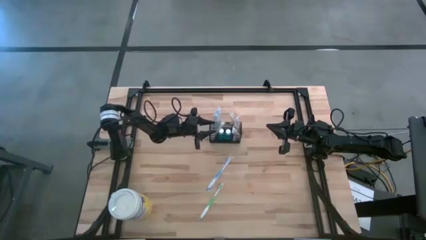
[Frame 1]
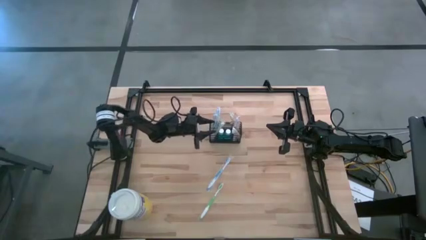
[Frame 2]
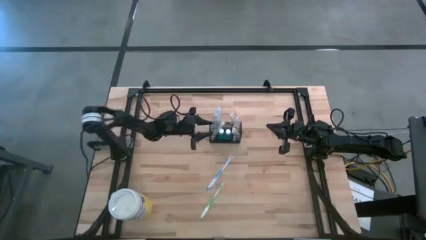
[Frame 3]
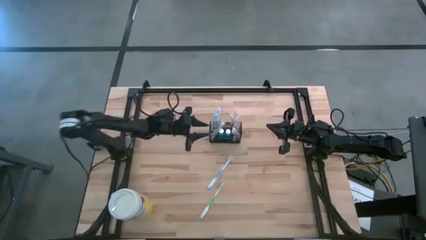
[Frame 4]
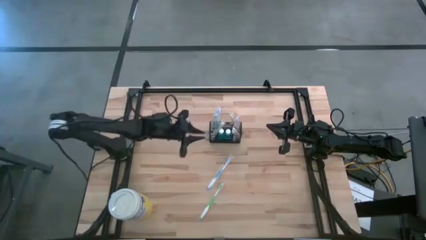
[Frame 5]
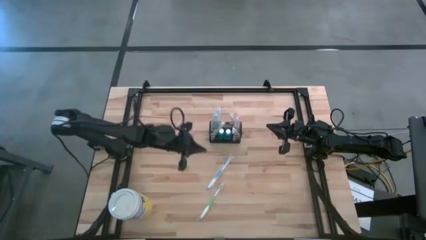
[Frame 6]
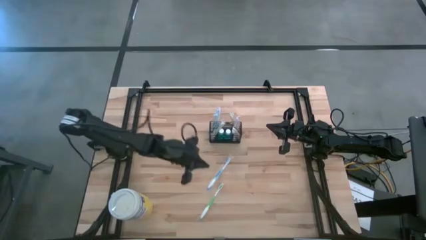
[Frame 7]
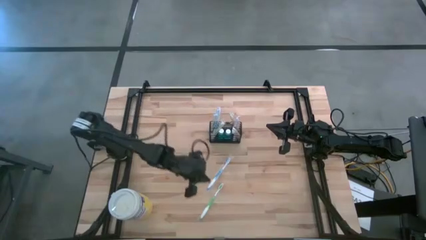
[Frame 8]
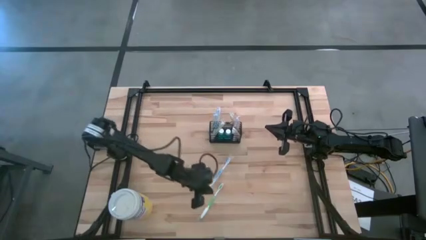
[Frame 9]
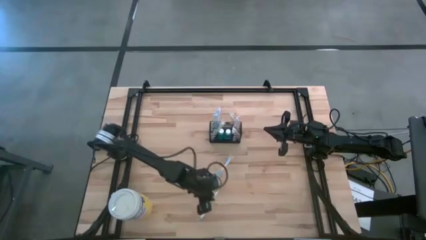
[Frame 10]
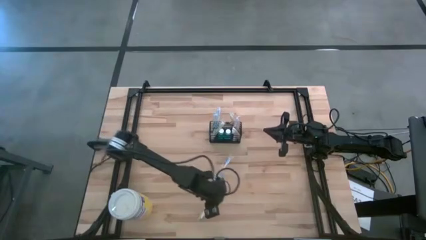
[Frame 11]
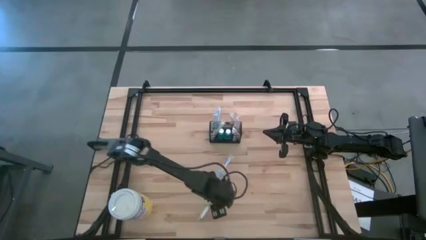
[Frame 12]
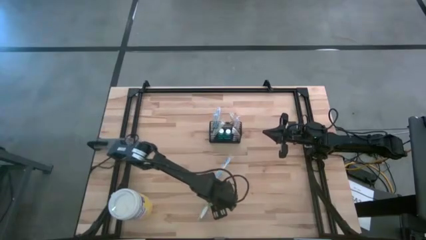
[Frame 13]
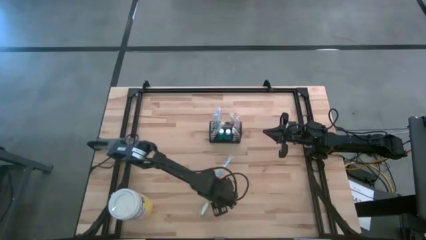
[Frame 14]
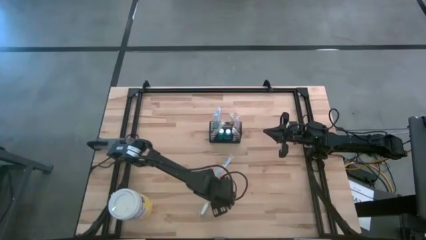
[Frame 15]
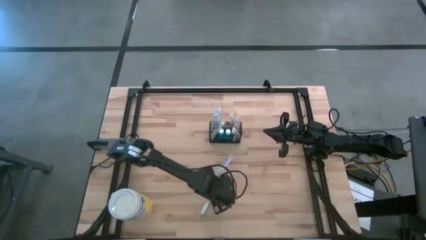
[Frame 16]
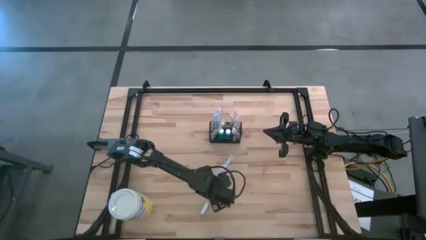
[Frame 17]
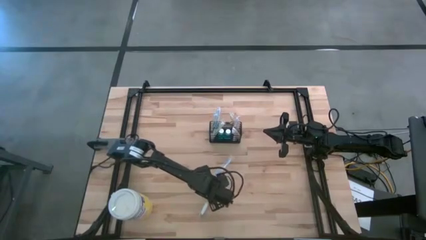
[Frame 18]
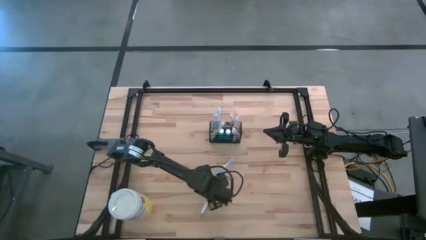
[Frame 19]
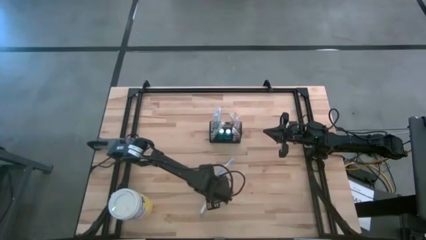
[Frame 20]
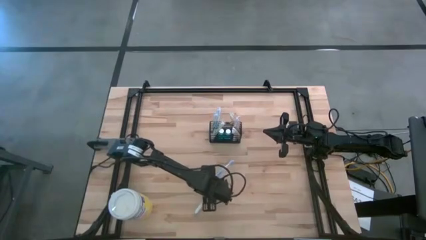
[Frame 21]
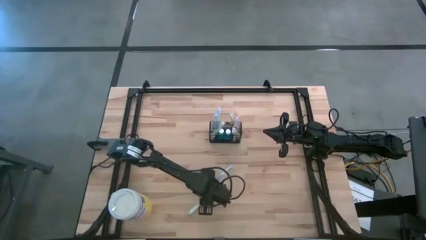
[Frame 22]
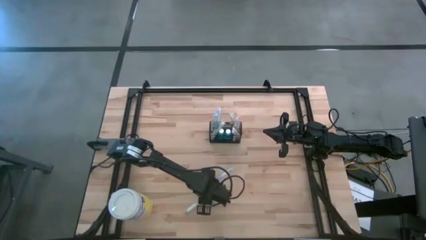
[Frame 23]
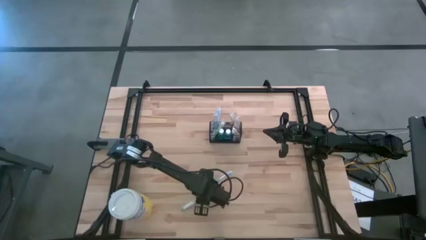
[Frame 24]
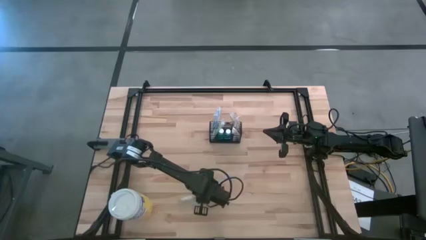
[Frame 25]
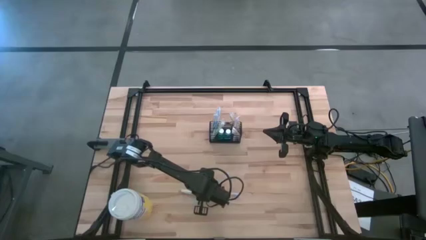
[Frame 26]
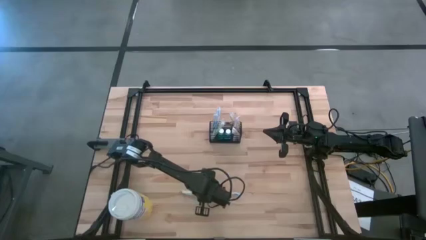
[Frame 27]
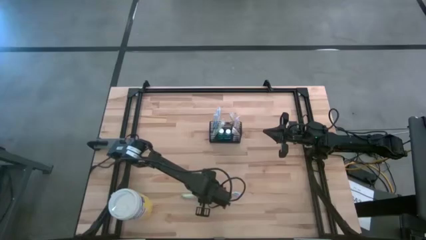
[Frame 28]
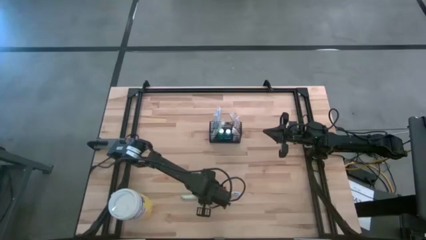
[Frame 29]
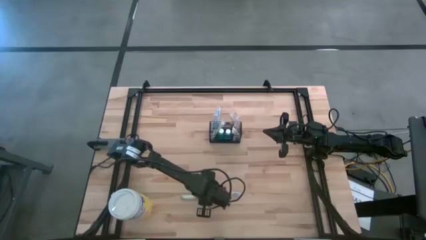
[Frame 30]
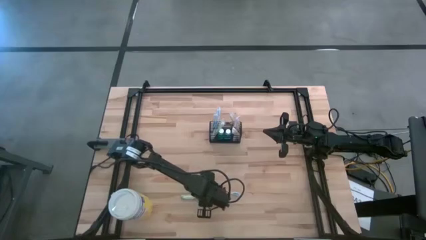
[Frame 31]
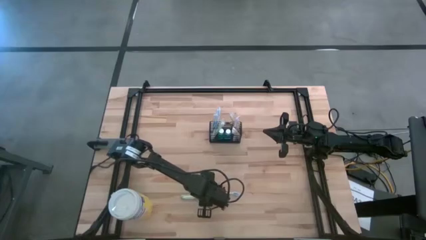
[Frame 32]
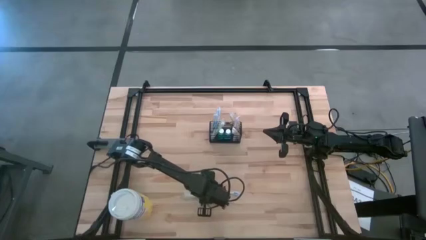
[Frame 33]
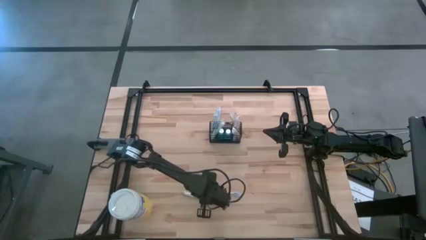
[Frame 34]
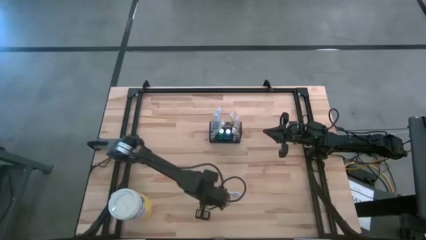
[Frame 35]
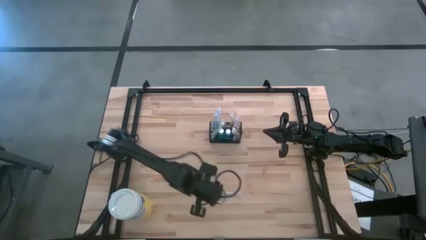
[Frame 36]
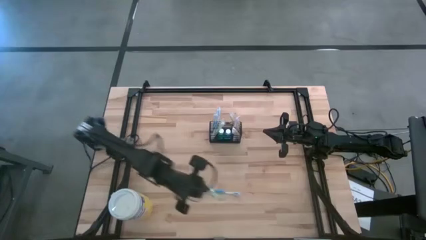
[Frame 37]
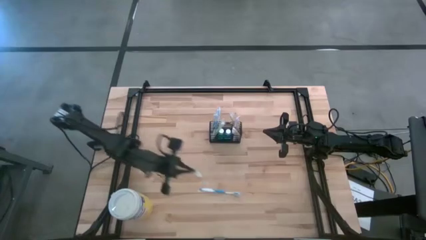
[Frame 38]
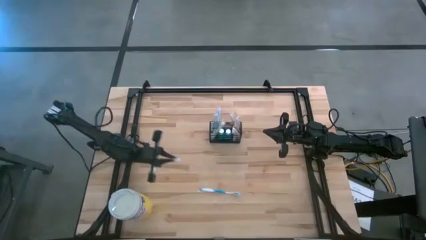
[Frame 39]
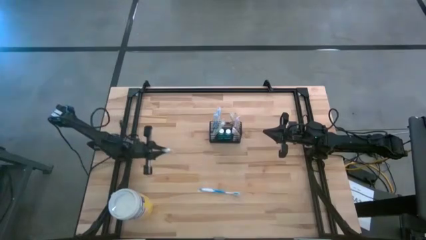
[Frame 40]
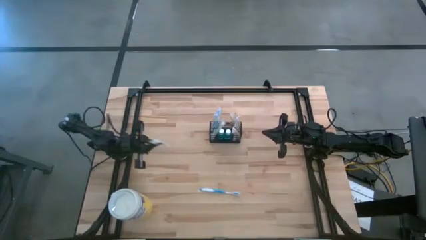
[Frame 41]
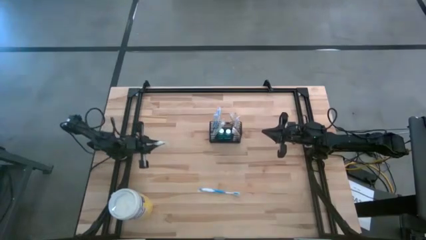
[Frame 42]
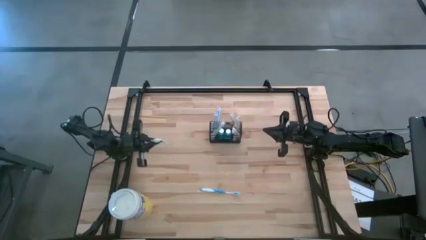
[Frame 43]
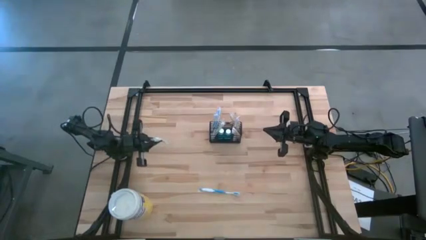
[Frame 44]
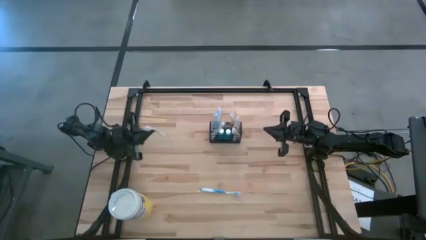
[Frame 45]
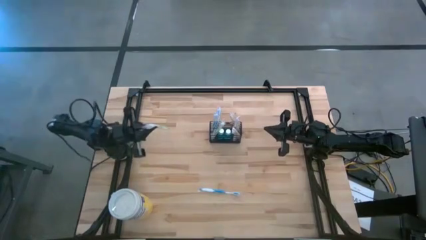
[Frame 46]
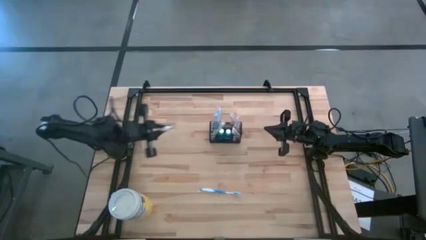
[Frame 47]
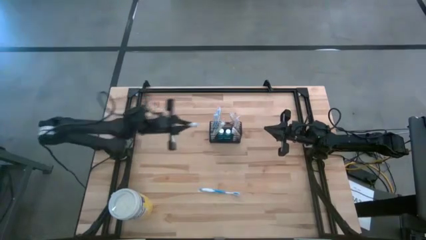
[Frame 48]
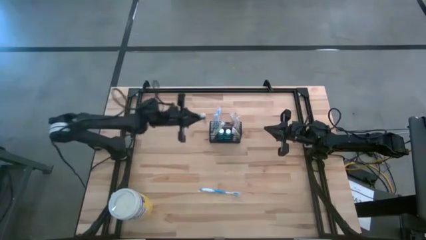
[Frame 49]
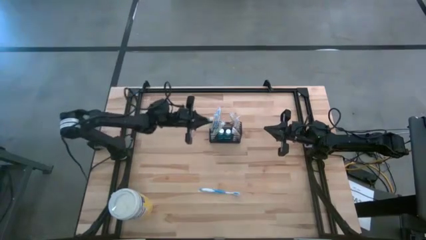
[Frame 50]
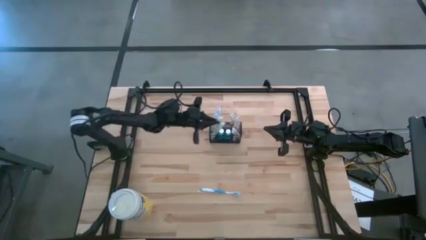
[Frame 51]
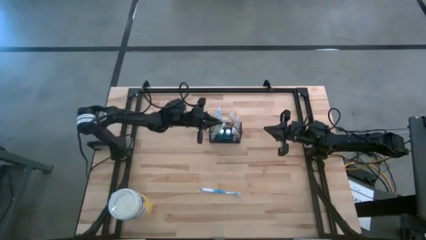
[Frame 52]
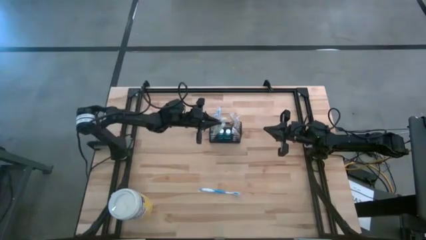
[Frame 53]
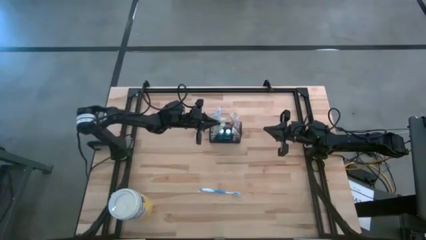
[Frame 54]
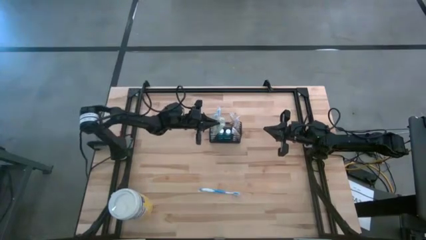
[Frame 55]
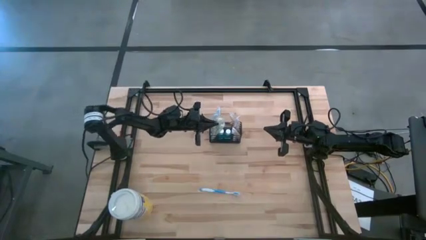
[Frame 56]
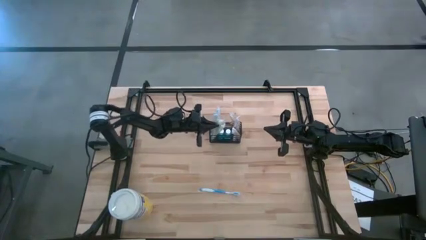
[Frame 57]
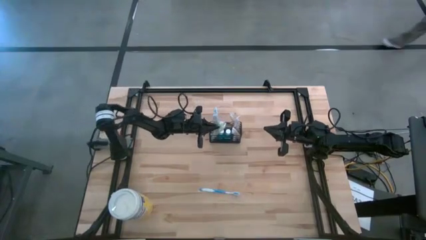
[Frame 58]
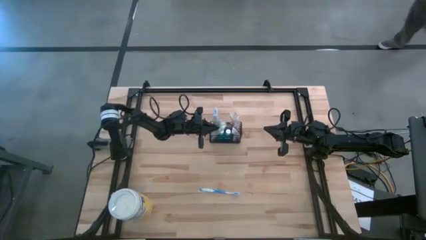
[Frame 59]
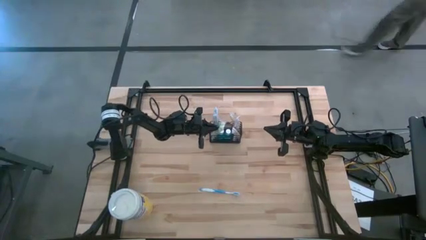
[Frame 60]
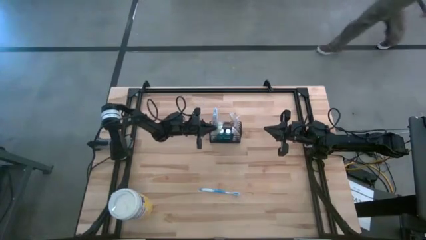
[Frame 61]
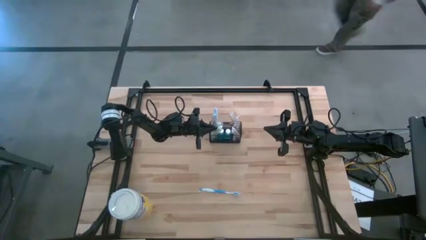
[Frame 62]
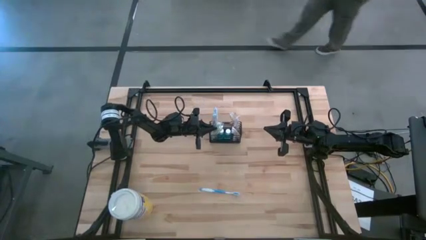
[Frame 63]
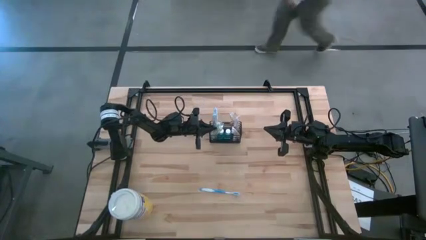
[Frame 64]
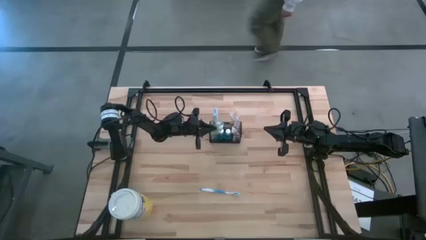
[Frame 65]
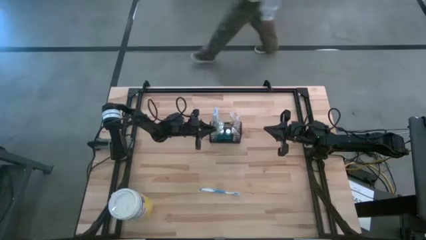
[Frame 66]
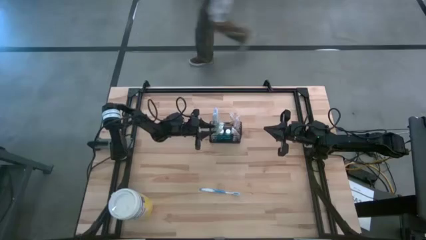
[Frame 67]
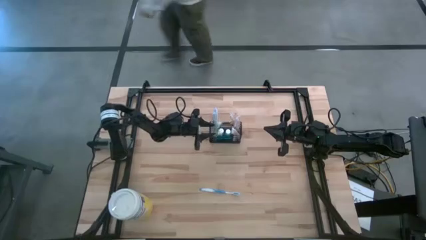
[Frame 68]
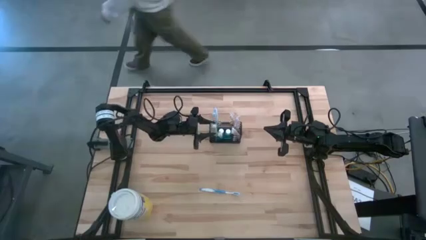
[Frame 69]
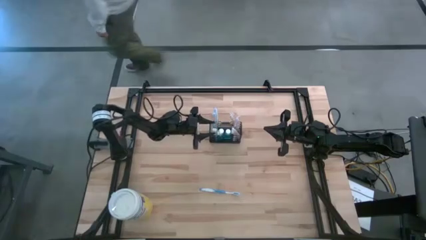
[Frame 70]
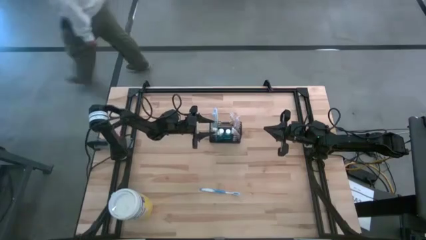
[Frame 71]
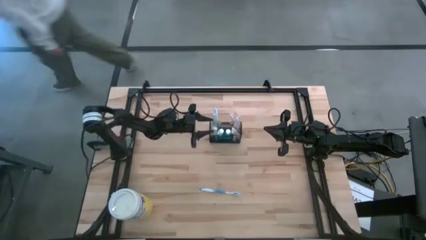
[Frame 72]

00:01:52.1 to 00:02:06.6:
Task: Pick & Place toothbrushing station
Put the green toothbrush into the wire organizer

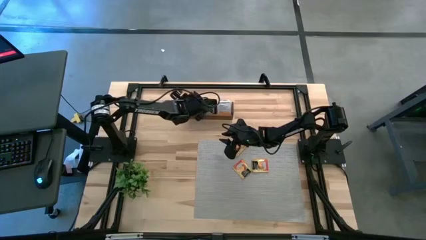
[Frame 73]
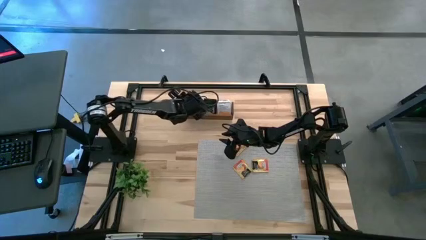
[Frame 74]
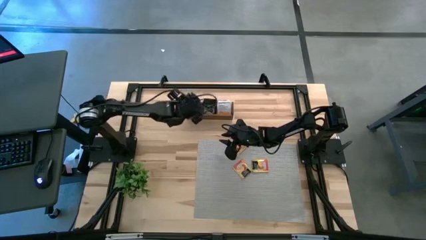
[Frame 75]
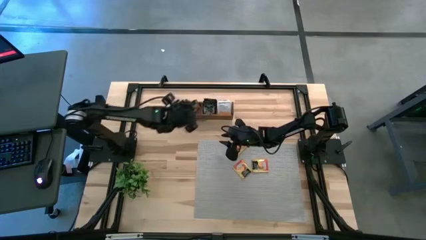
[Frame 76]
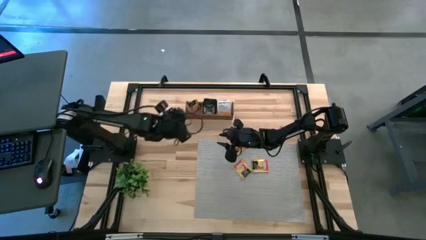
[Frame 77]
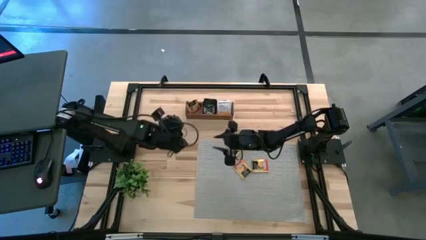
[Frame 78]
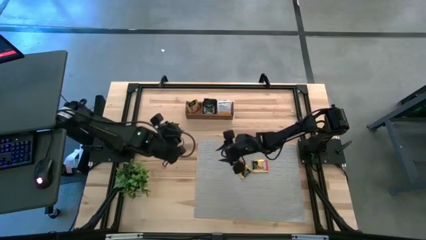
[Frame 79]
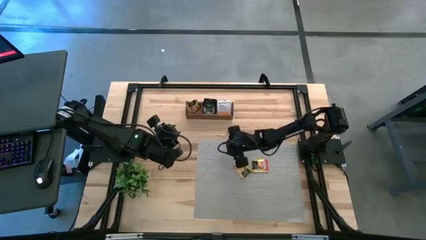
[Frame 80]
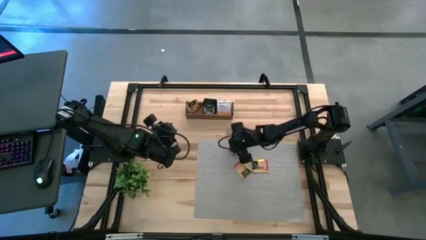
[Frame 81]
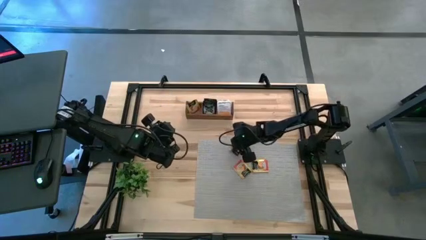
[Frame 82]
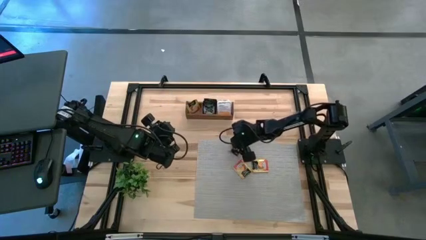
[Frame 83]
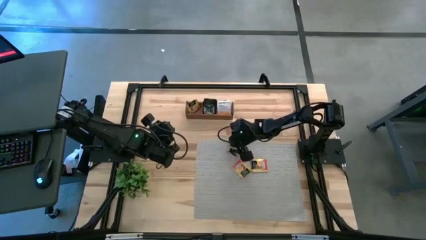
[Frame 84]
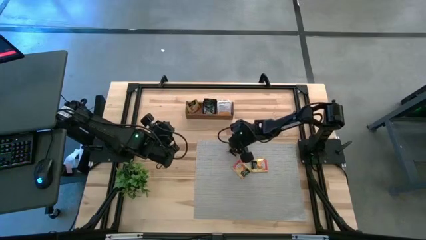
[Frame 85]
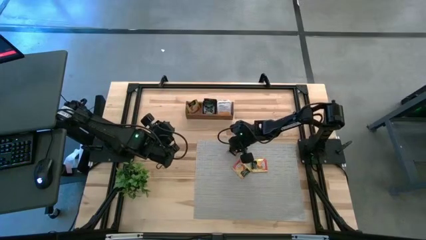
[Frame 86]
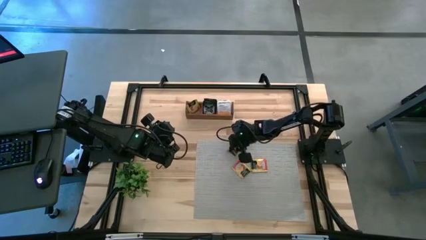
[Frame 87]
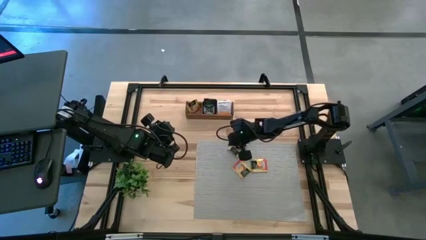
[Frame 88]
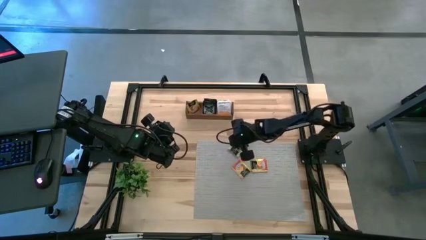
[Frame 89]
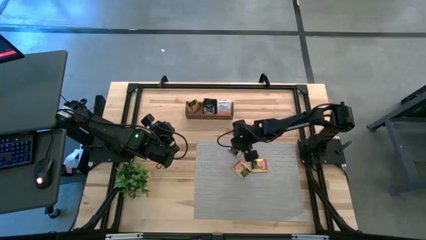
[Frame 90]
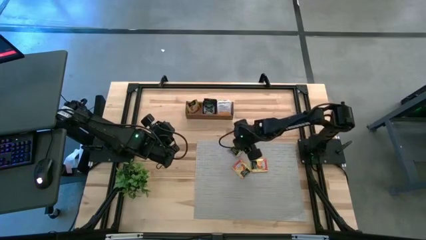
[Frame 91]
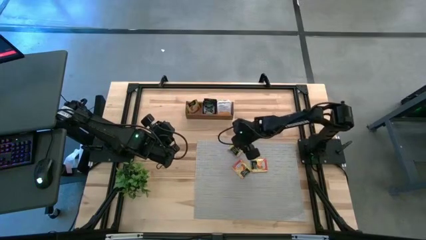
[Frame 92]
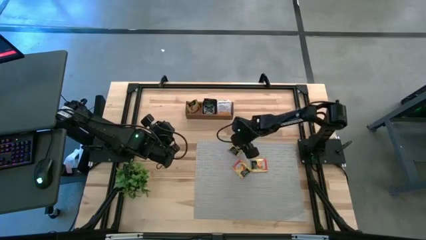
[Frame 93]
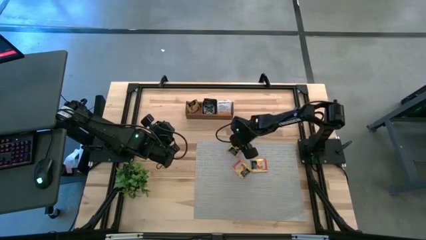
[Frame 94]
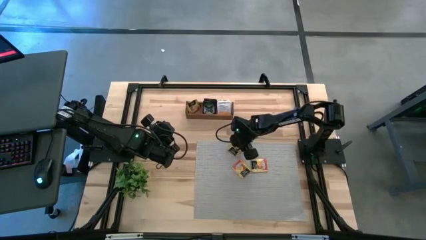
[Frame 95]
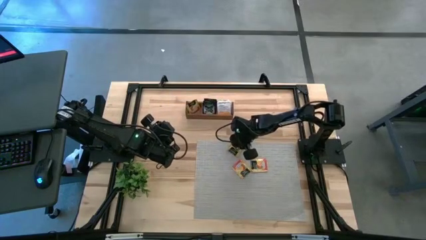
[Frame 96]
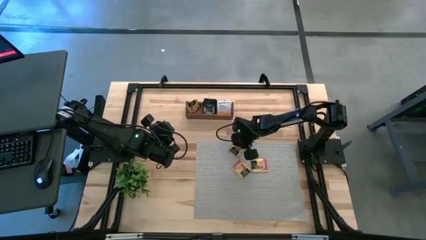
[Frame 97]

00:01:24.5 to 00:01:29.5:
Task: Pick & Place Tea
Put the orange tea bag into the left section of the wooden organizer
